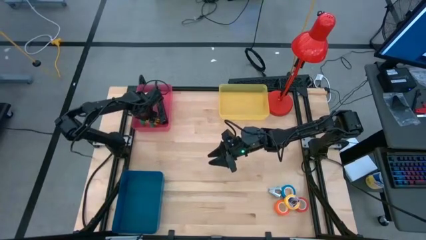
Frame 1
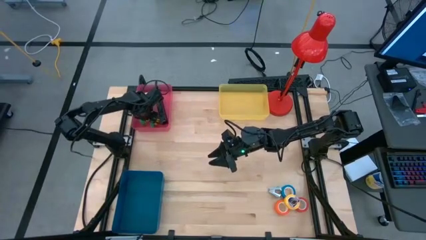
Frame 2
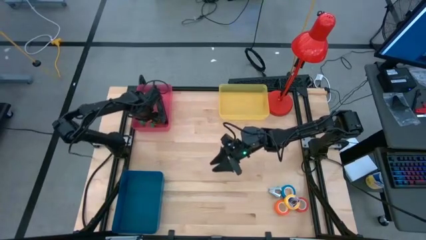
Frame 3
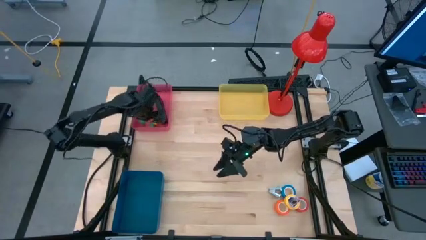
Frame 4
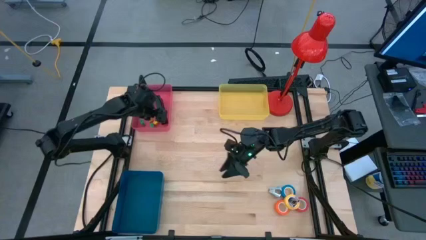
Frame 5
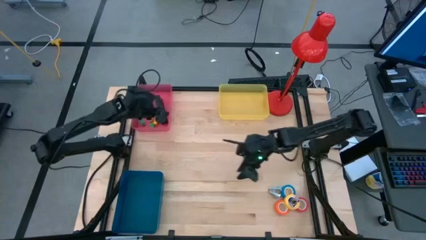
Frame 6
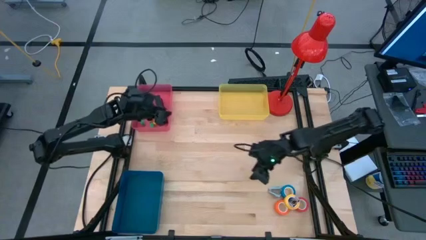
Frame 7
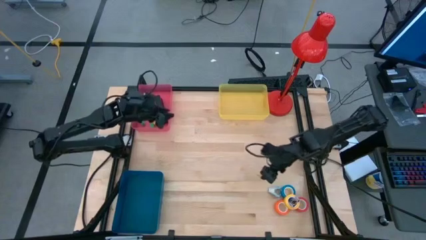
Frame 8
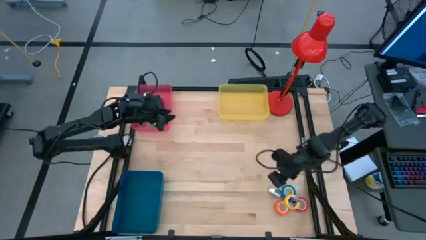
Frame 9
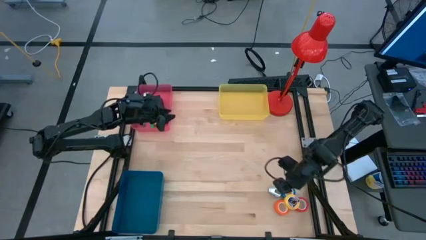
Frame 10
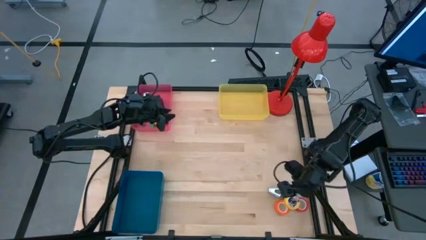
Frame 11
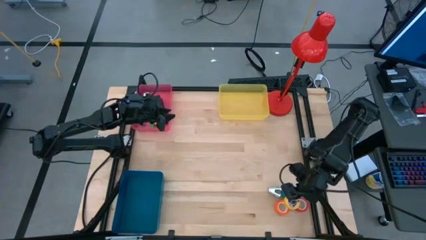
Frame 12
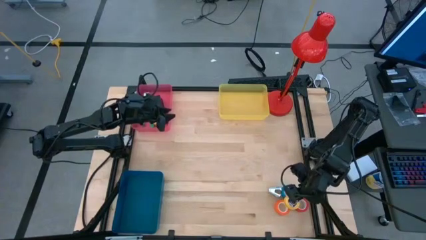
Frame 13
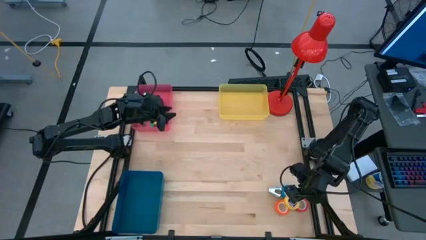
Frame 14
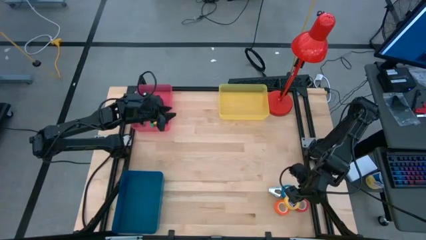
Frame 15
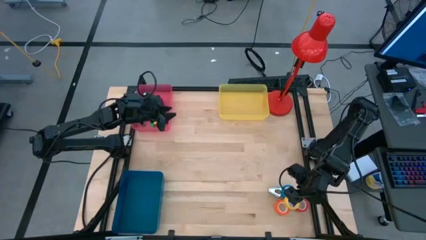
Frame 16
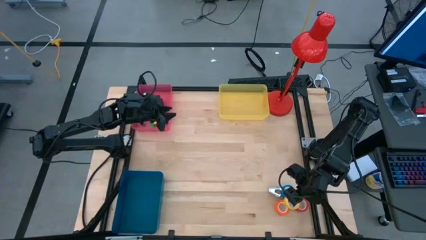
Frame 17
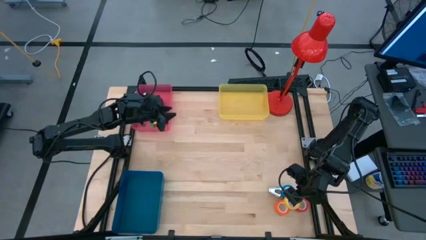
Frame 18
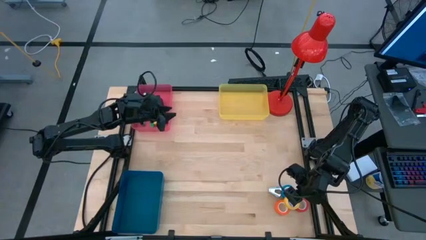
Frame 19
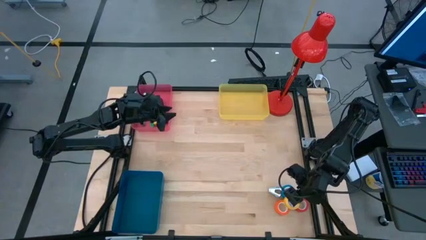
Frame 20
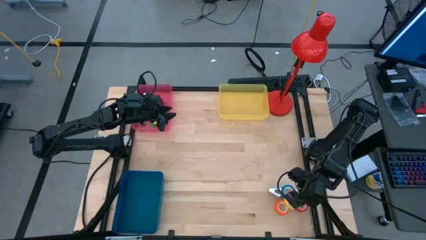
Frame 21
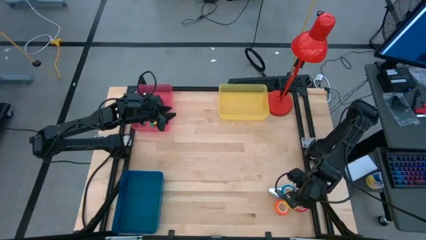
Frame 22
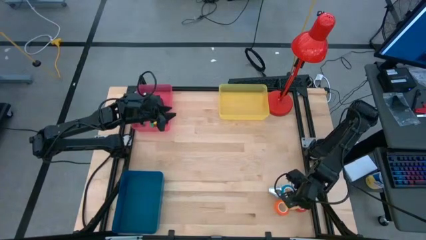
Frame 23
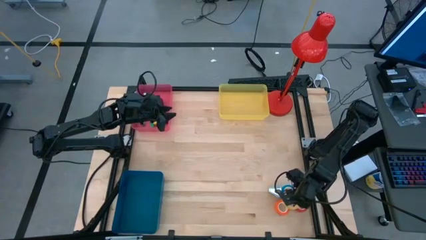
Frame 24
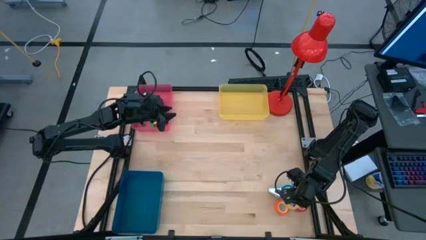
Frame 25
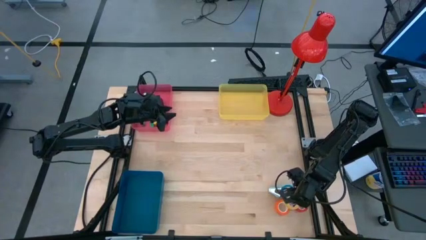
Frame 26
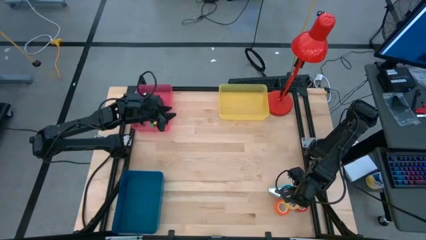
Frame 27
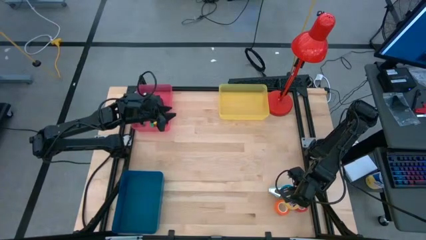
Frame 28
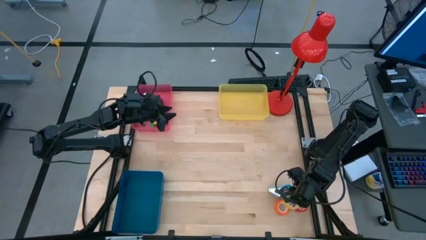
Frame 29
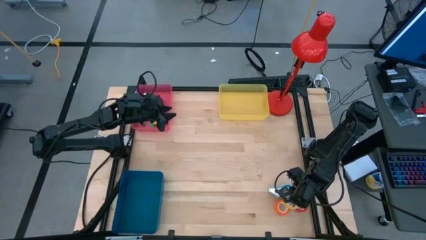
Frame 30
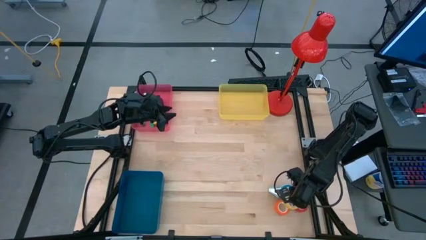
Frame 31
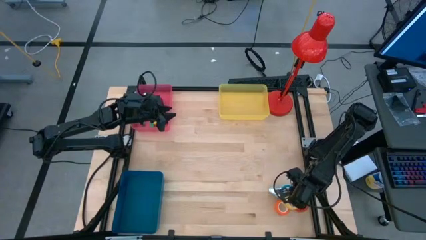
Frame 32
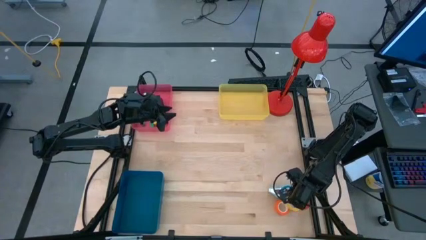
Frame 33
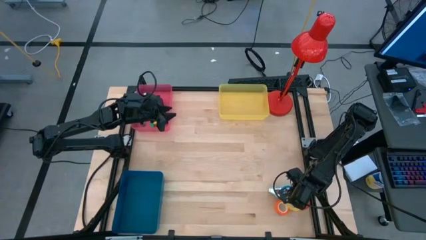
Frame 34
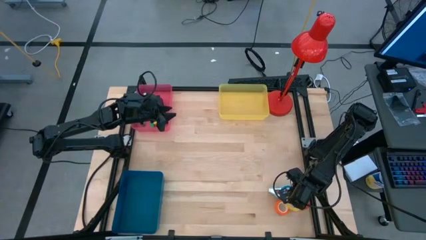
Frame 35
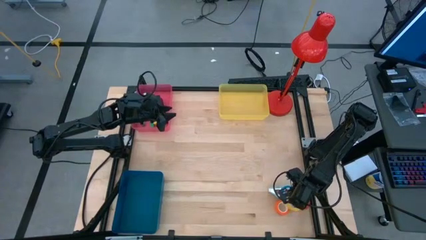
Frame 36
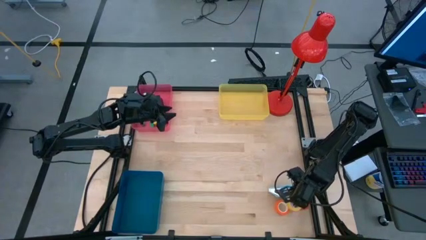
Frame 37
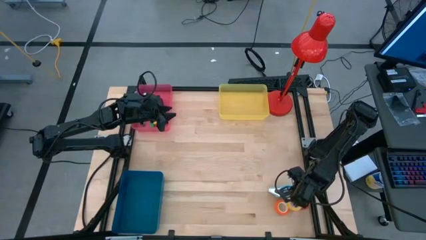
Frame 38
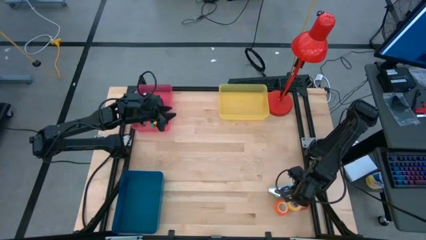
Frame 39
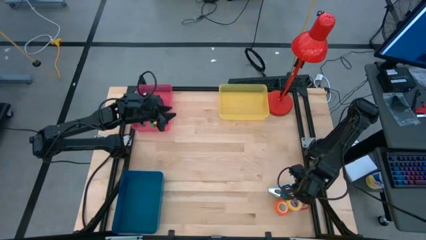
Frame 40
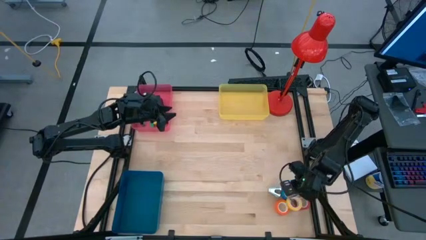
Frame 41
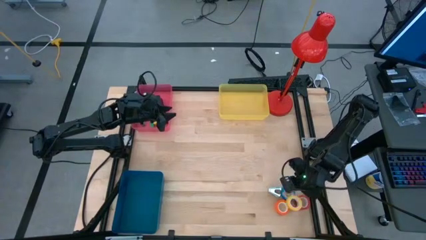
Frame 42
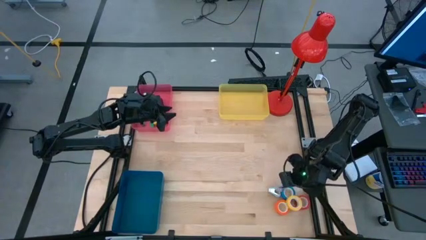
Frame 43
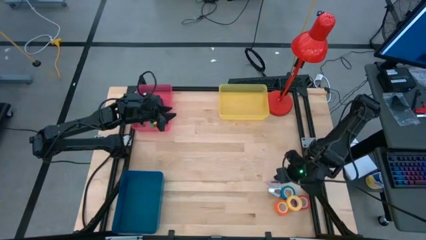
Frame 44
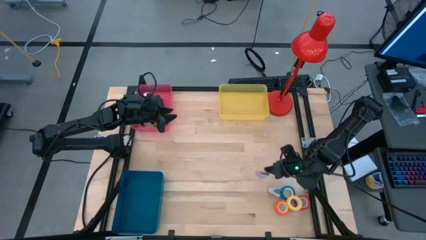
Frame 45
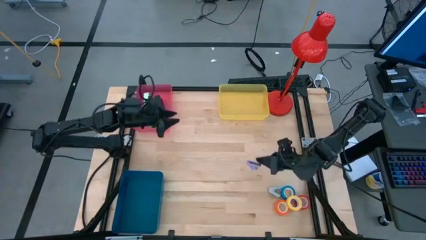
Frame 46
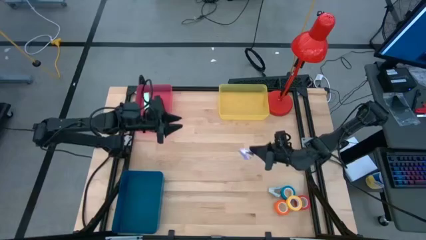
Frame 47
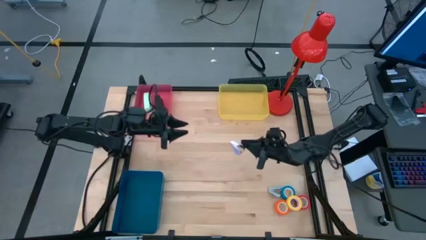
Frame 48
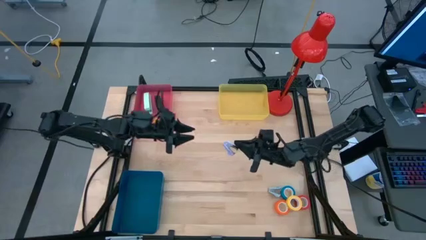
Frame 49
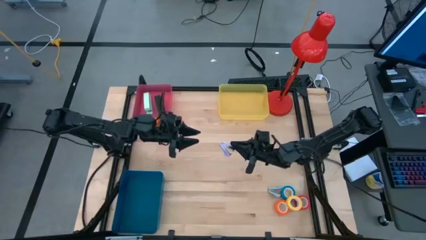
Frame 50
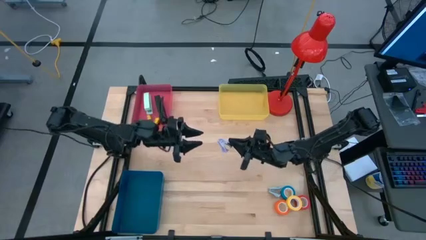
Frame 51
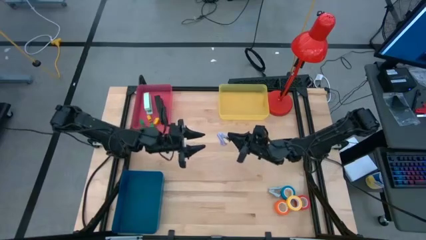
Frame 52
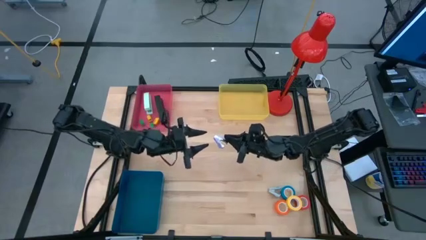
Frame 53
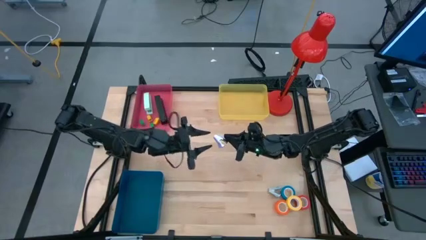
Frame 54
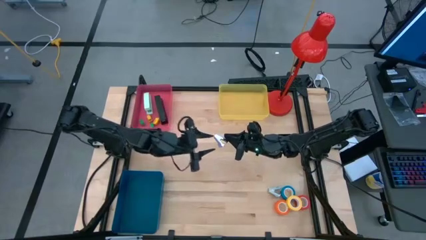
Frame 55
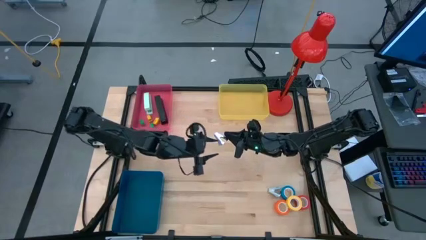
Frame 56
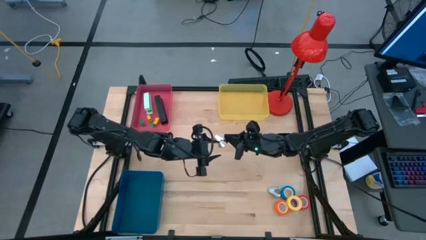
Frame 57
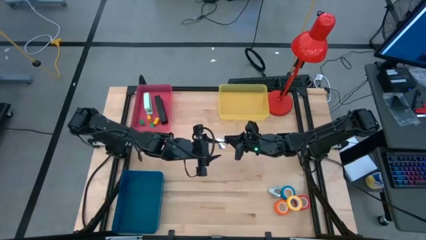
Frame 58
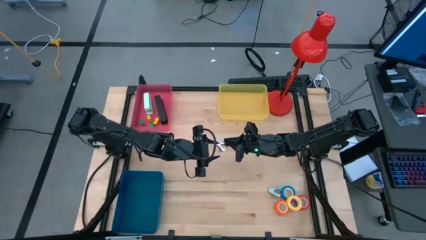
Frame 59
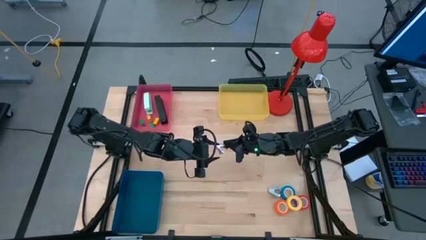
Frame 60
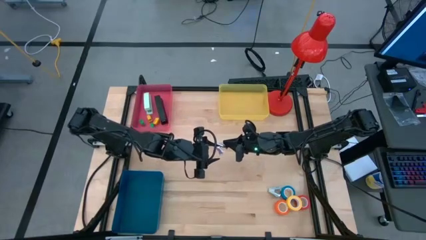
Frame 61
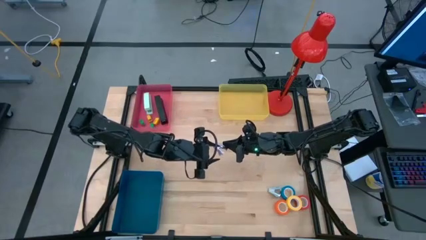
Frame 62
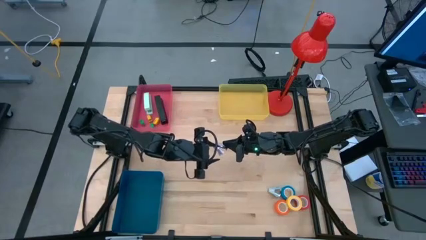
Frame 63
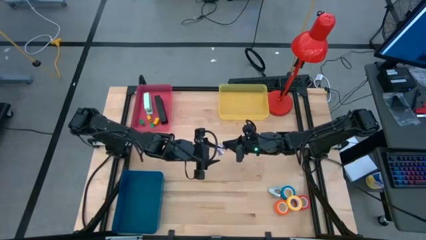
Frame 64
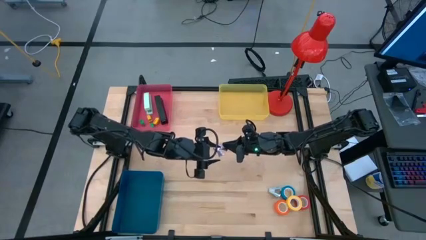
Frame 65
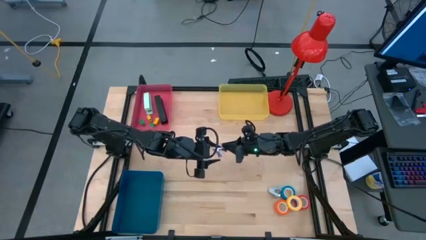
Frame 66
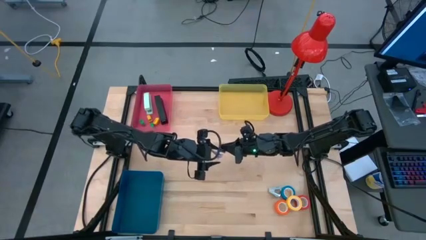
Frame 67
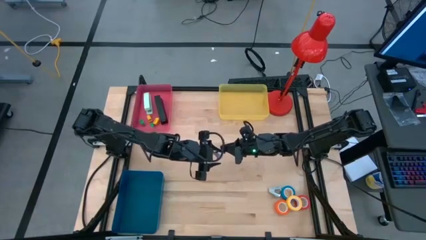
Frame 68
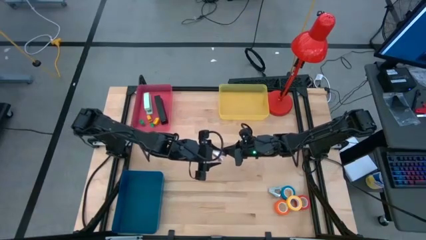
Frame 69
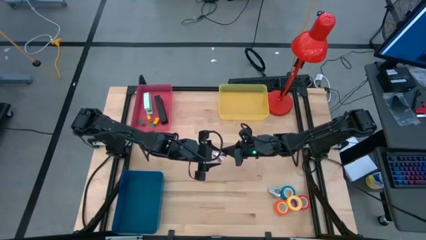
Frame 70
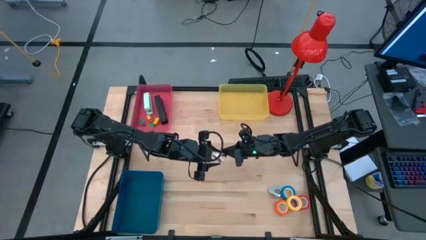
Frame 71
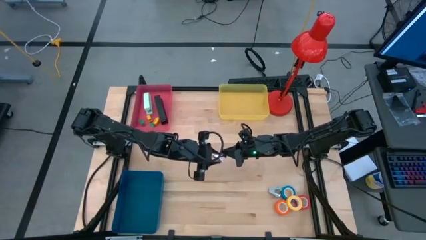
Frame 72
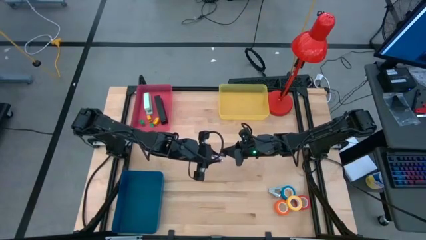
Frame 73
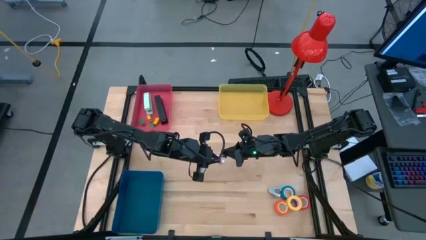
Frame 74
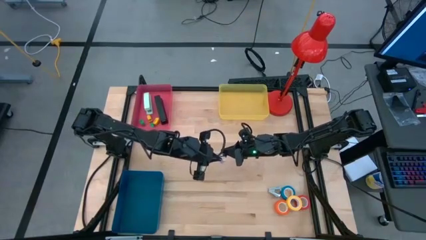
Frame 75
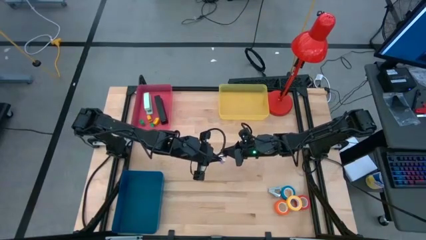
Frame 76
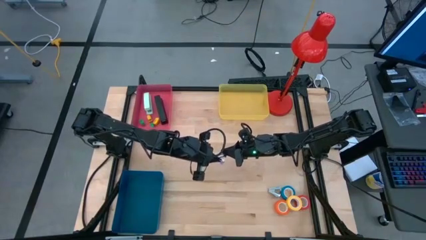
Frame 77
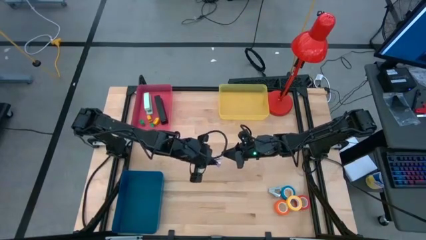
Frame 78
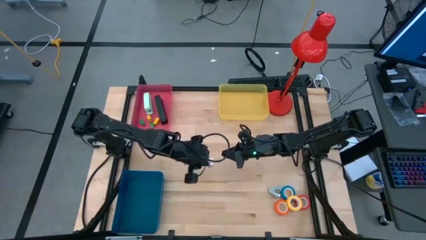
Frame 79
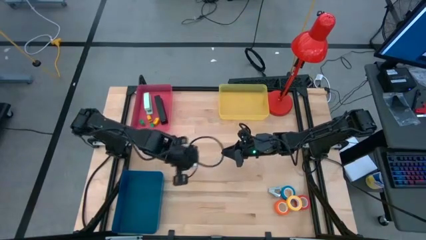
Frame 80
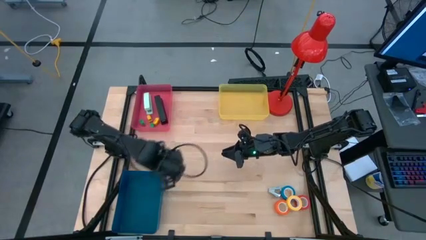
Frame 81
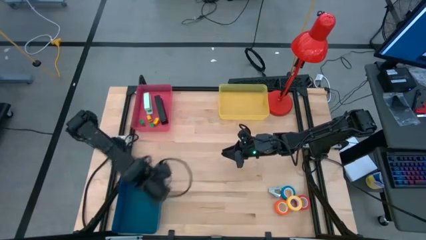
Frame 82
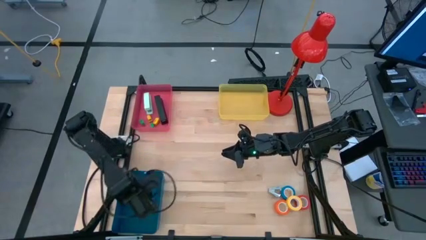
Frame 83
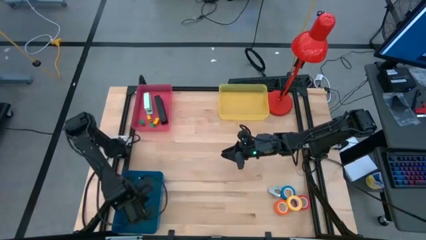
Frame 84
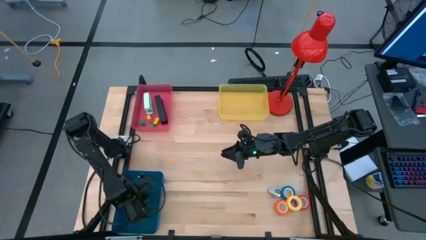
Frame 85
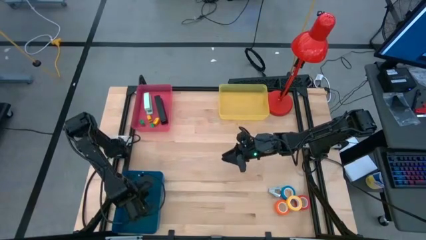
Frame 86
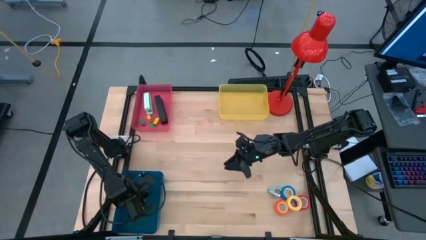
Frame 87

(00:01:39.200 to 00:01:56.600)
Task: Pick and place Stapler, Stapler remover, tape
Put the light violet staple remover into the blue bin
